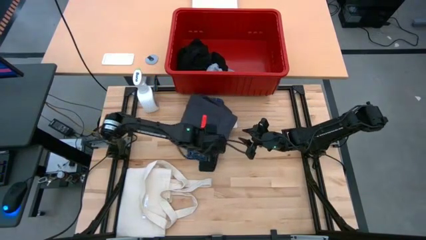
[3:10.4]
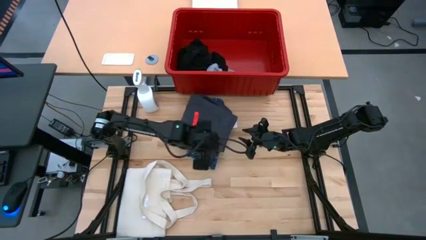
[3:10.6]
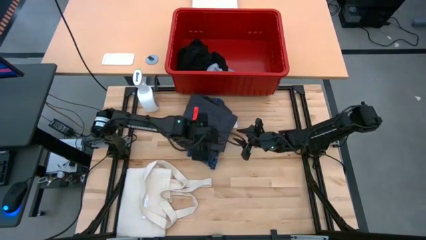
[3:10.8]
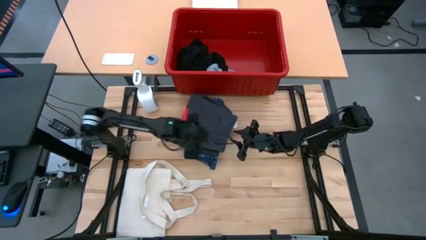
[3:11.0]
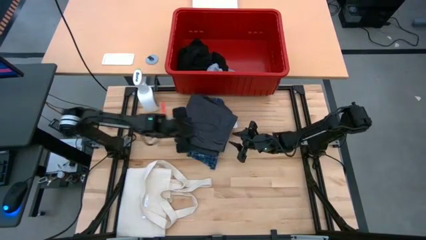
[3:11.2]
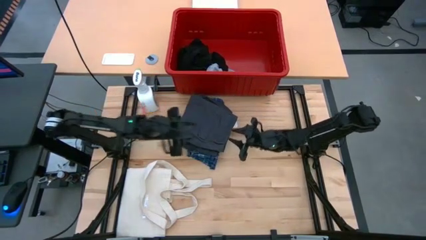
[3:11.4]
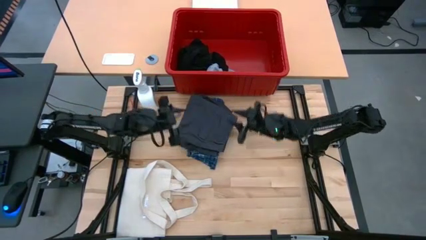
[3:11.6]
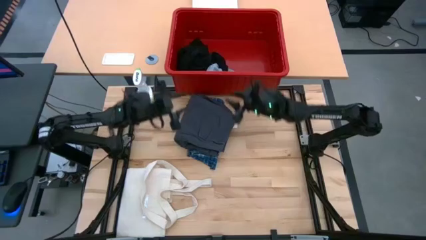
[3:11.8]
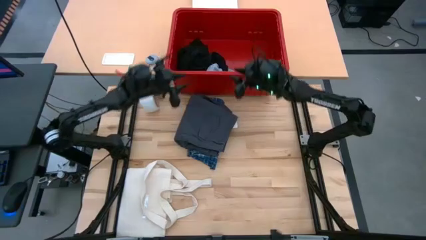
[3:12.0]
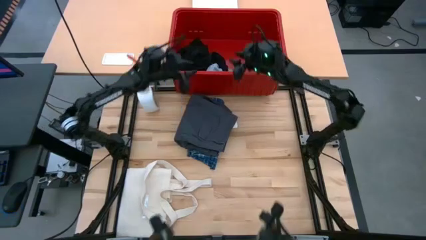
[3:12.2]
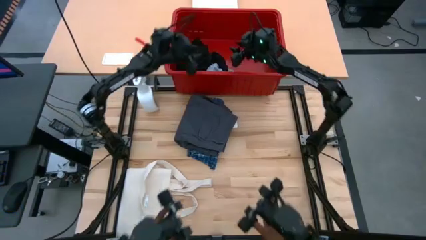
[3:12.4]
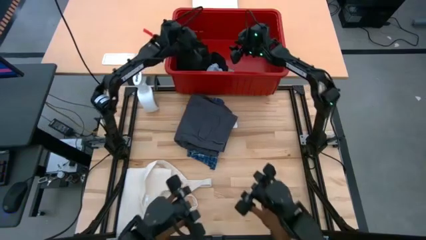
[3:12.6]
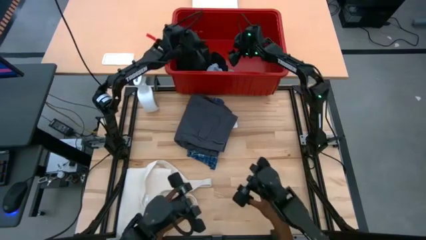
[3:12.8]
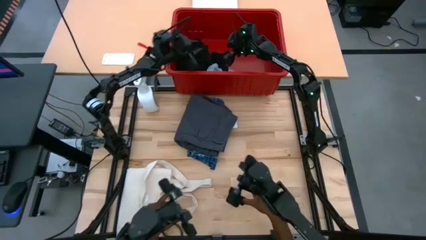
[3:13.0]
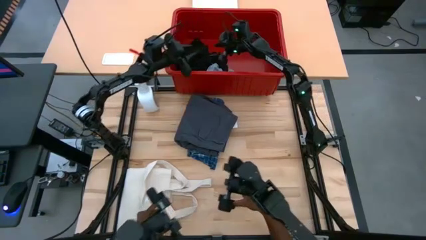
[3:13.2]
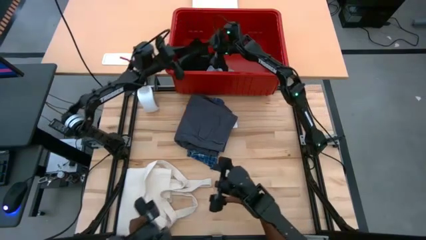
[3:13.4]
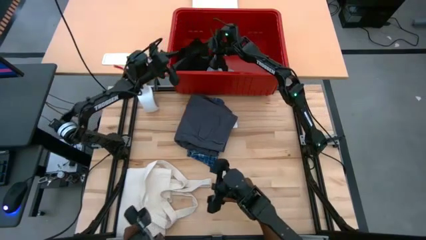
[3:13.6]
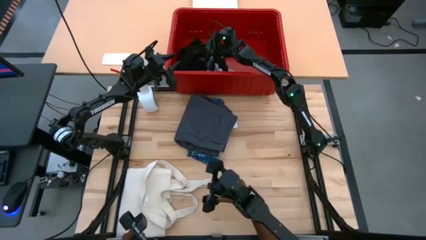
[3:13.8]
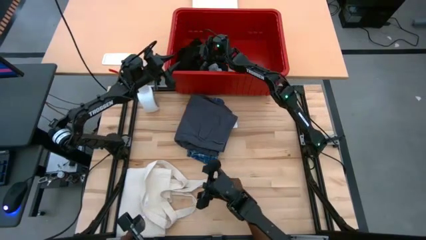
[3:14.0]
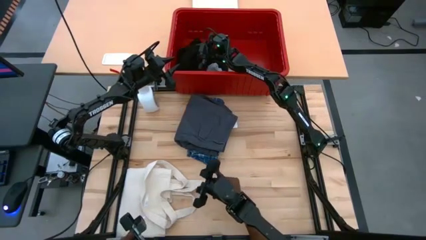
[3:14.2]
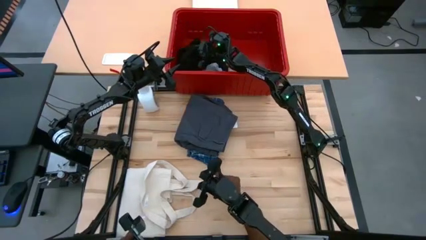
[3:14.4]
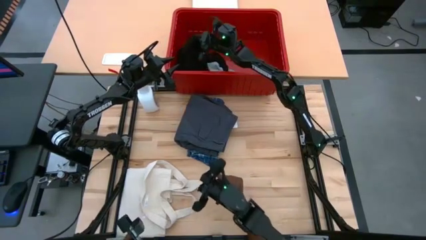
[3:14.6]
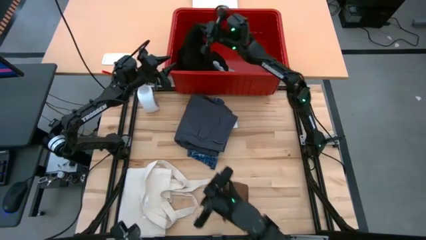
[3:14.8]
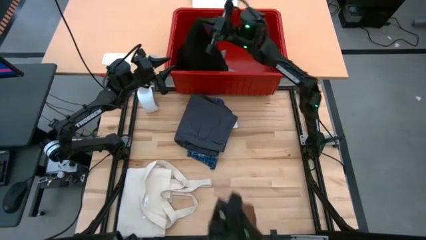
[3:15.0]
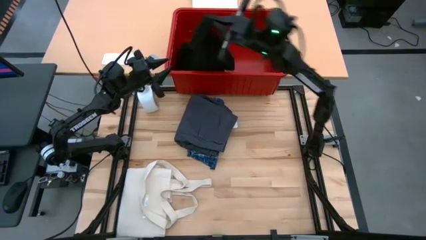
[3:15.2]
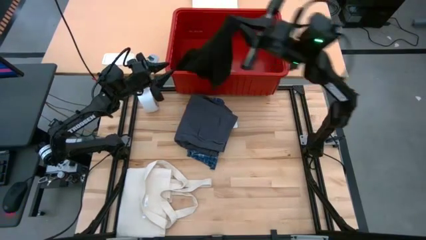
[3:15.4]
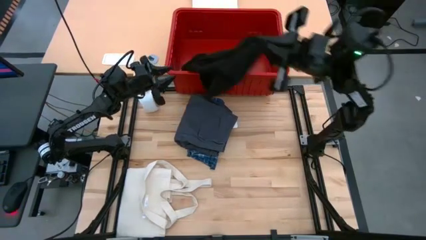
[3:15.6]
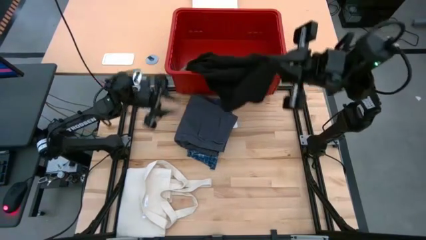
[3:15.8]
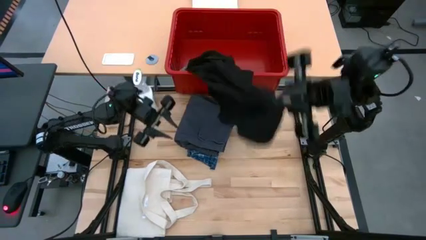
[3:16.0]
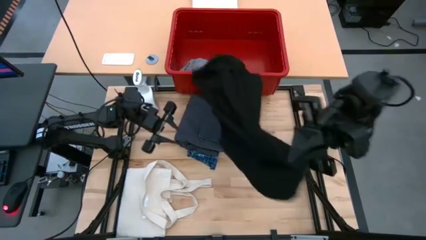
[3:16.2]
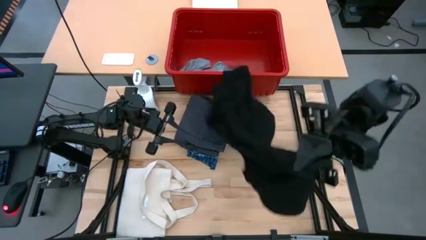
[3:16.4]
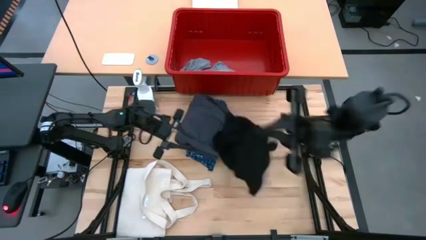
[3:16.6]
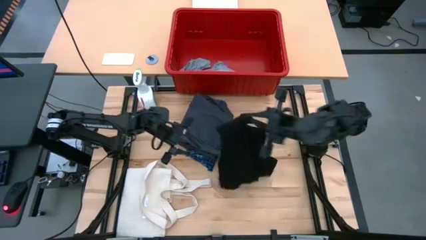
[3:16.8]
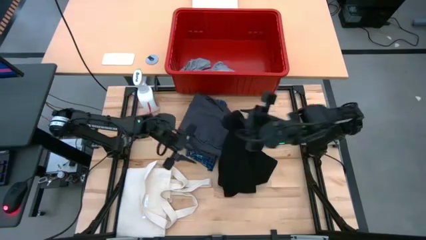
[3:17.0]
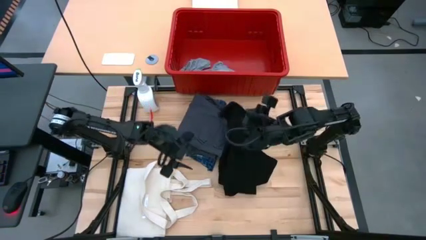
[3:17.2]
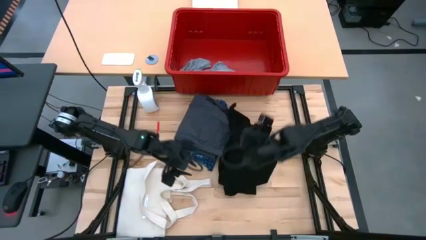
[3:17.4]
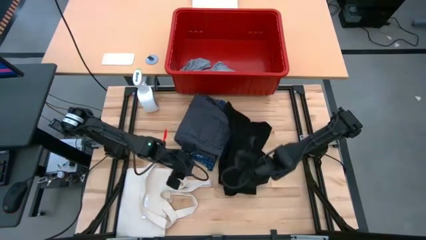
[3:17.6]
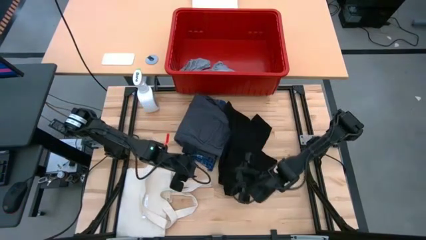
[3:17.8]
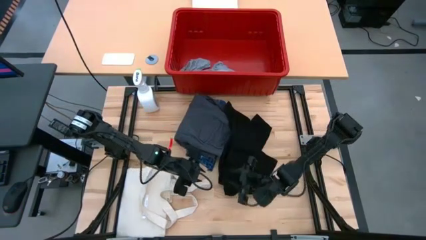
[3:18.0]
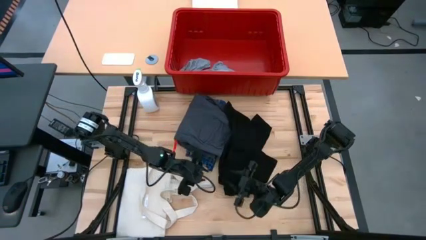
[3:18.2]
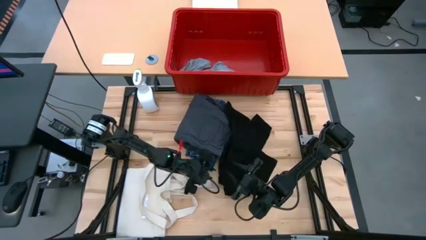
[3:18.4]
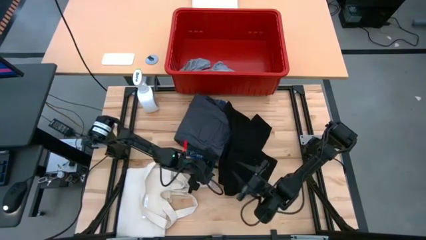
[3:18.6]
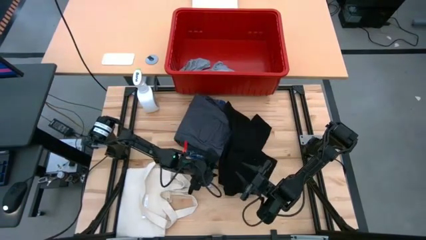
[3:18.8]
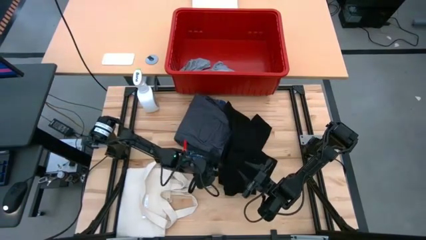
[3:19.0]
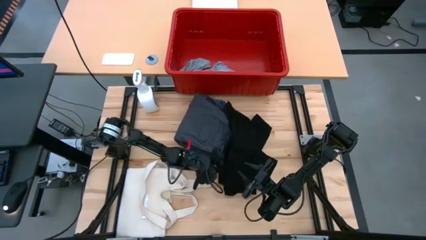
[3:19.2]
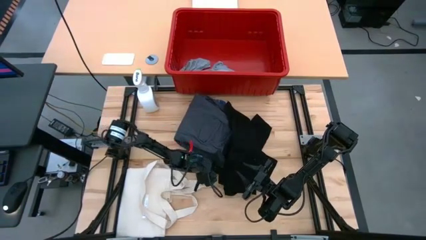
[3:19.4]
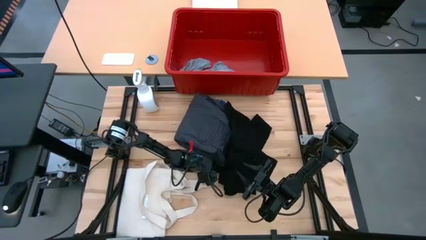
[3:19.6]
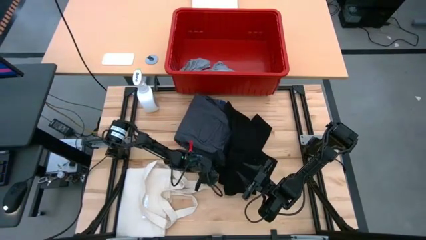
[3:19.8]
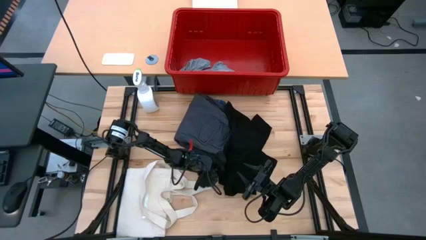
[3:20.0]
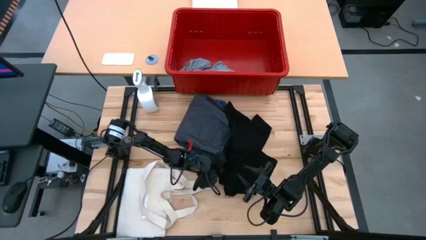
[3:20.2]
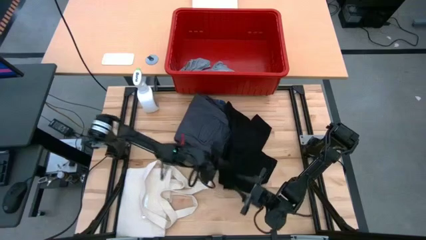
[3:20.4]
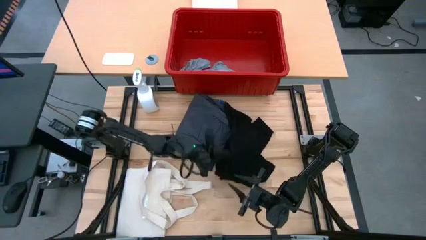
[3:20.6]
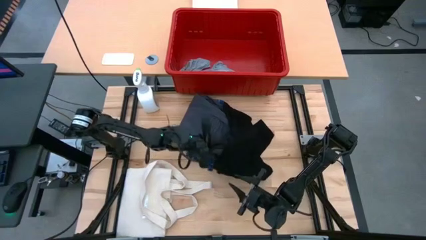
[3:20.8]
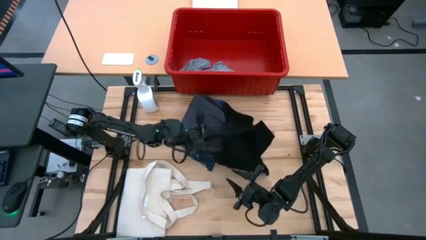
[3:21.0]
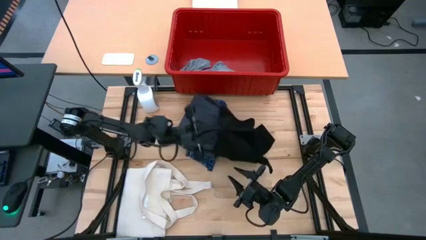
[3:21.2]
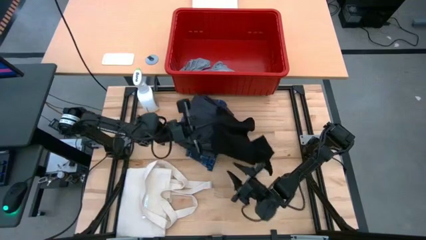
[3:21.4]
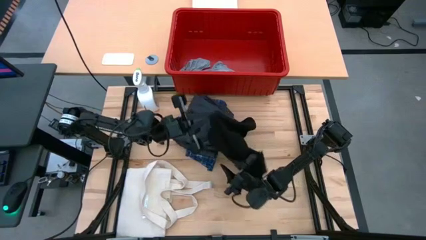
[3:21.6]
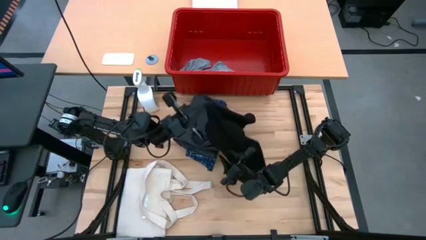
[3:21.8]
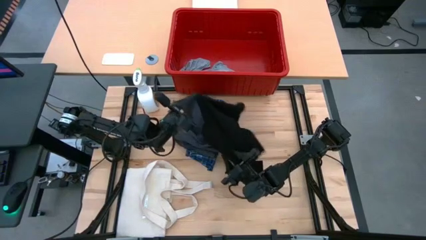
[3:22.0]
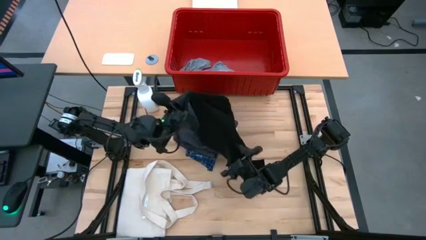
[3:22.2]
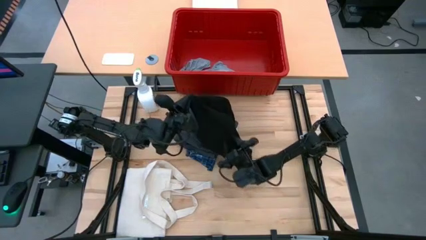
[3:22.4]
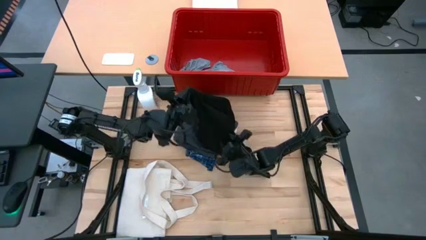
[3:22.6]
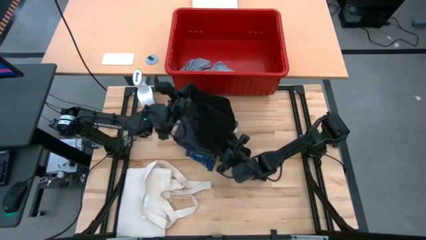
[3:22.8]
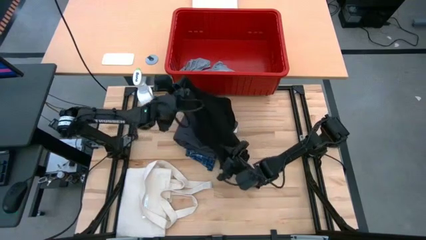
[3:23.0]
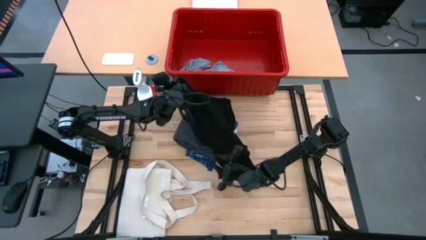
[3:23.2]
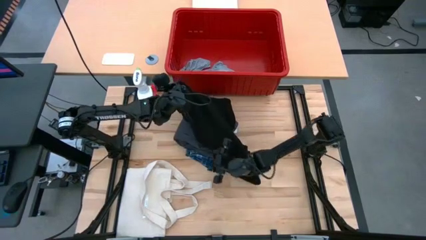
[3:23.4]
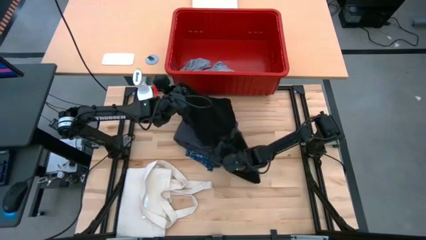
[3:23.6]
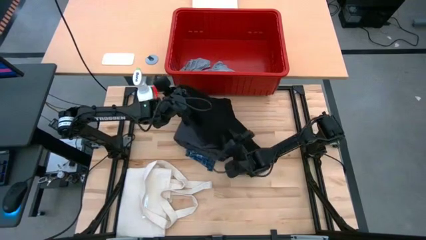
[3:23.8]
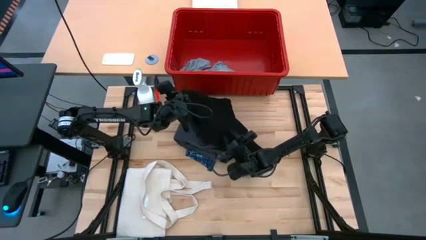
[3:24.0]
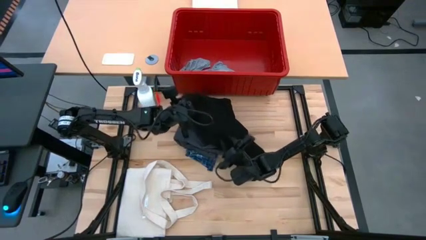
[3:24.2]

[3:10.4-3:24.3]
Task: Fold Laundry from Bin
Fold the black shirt
